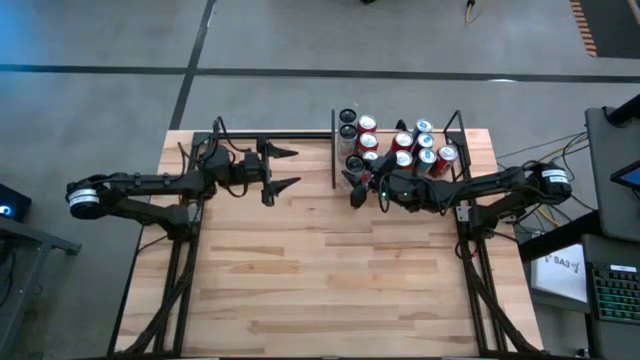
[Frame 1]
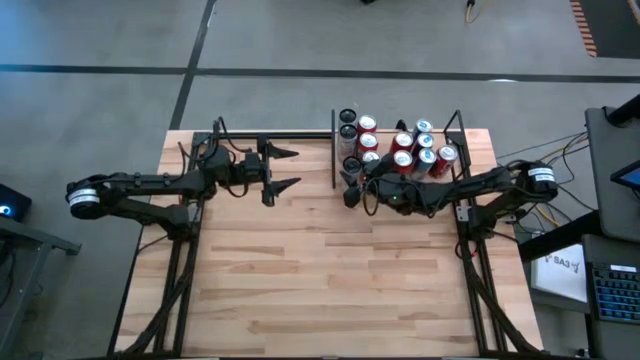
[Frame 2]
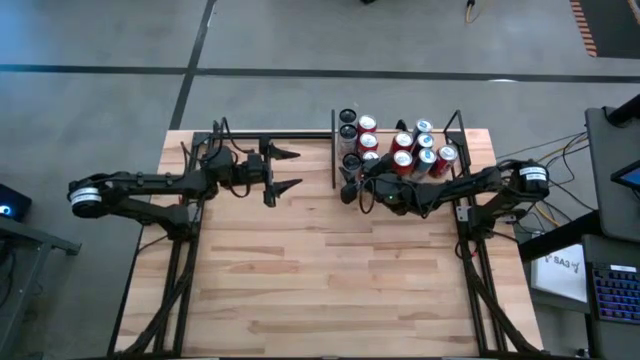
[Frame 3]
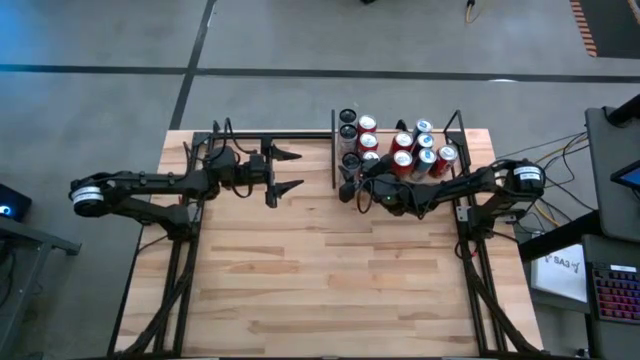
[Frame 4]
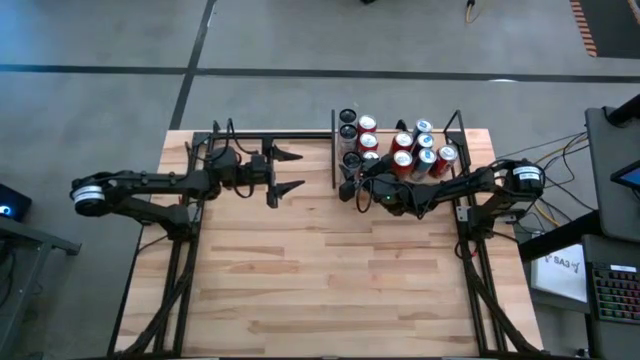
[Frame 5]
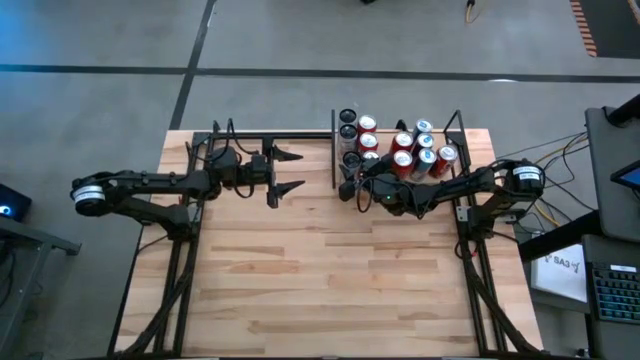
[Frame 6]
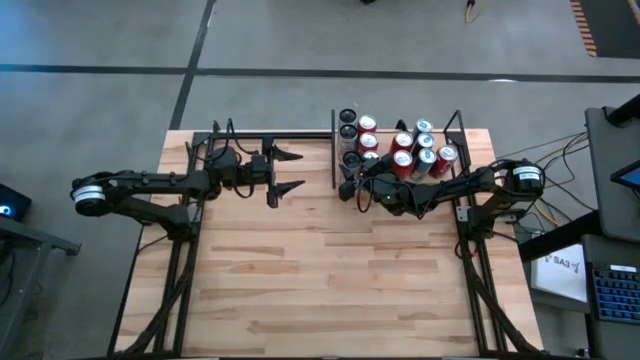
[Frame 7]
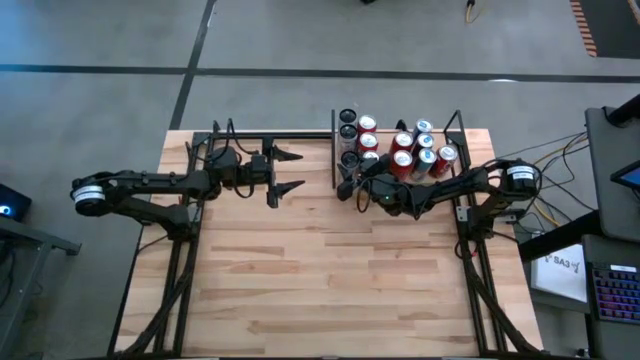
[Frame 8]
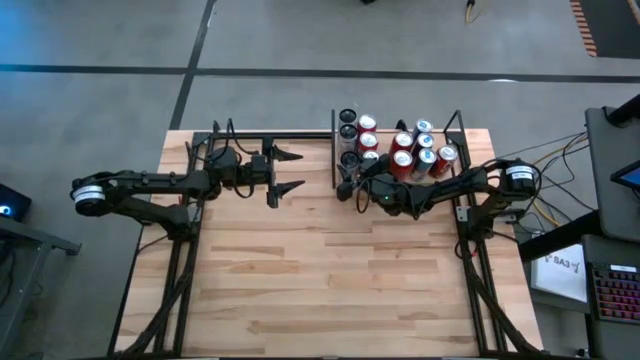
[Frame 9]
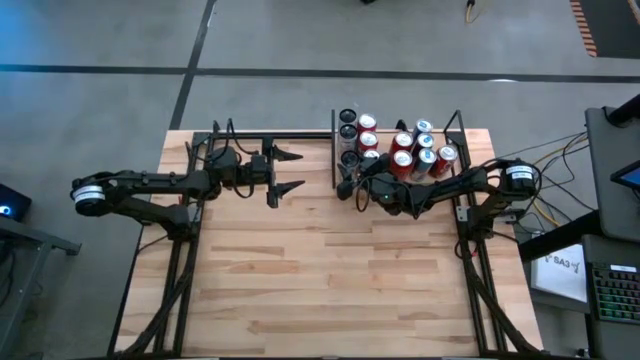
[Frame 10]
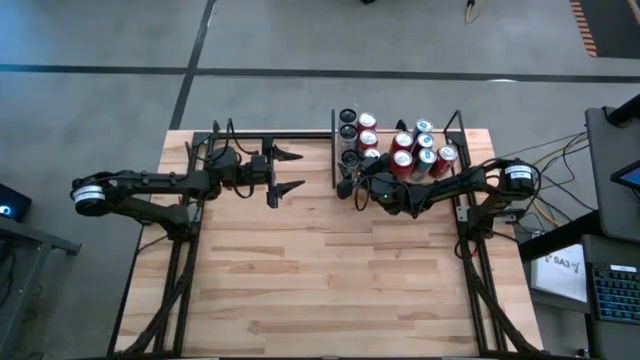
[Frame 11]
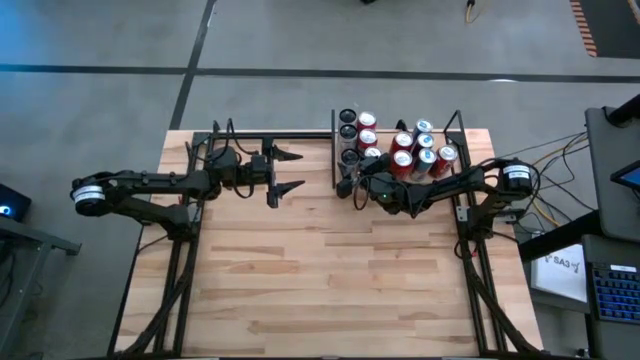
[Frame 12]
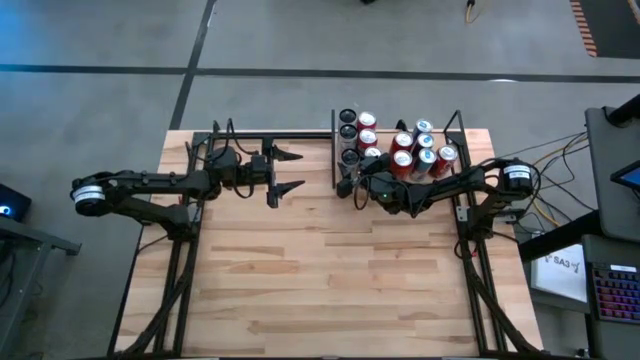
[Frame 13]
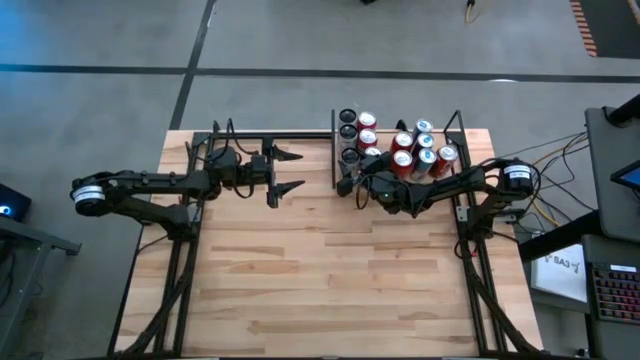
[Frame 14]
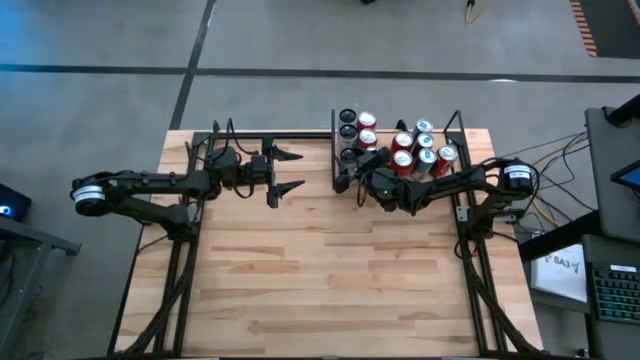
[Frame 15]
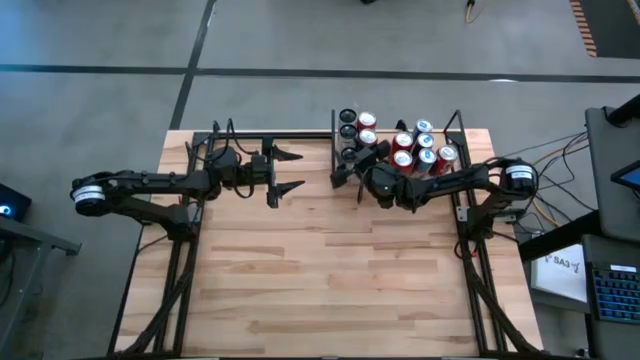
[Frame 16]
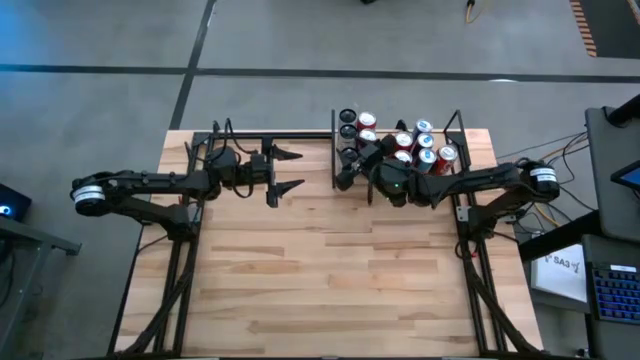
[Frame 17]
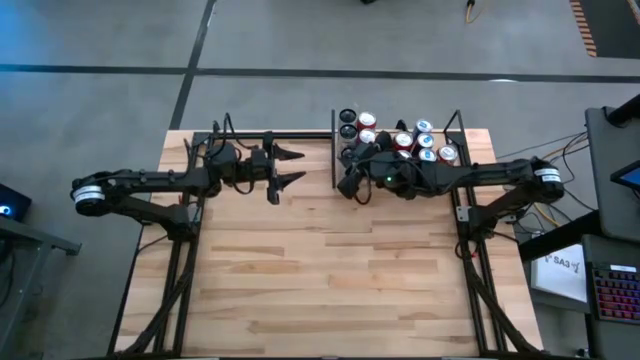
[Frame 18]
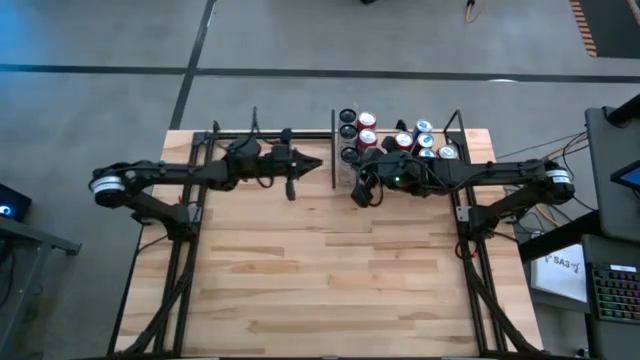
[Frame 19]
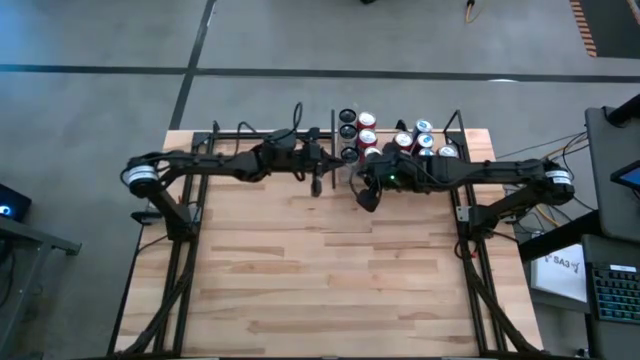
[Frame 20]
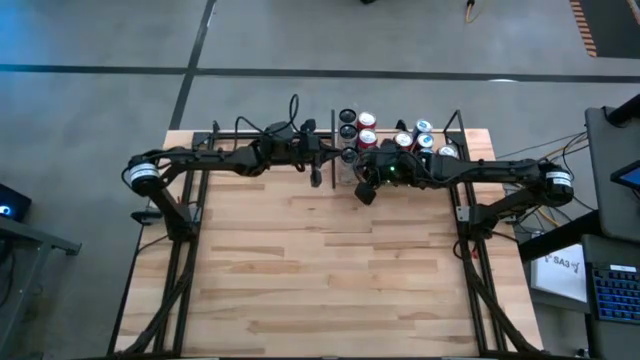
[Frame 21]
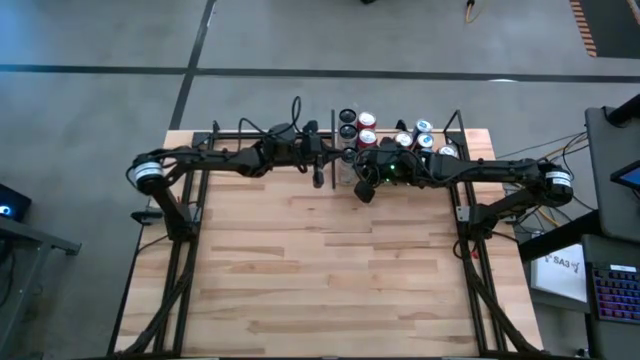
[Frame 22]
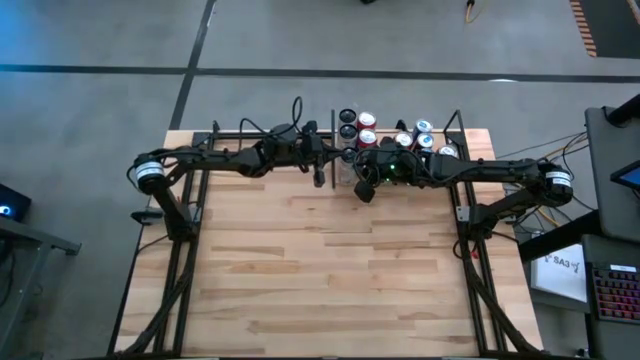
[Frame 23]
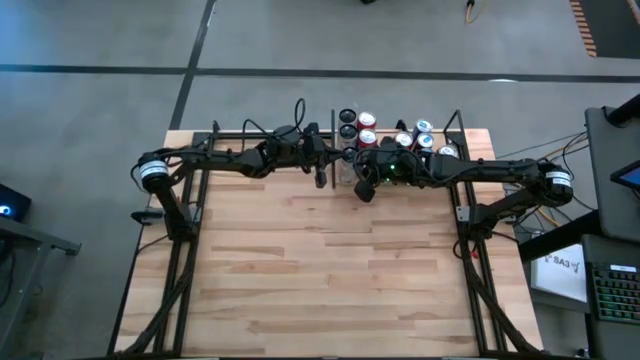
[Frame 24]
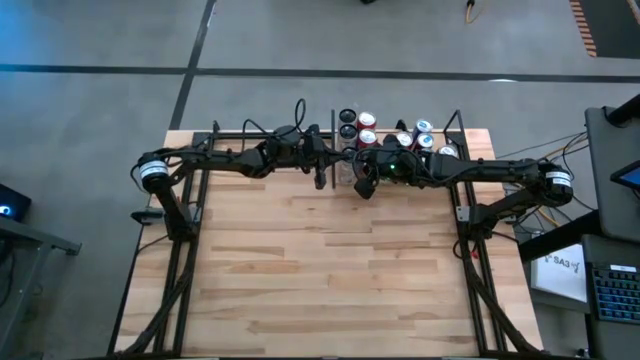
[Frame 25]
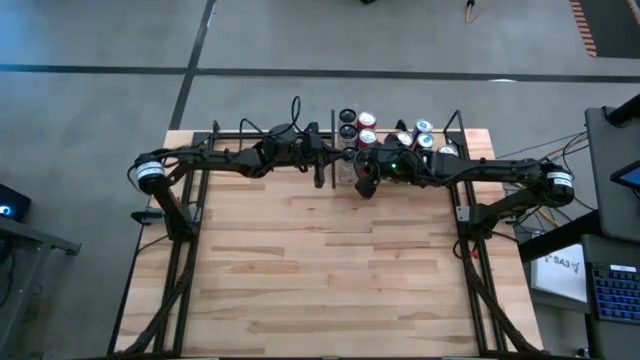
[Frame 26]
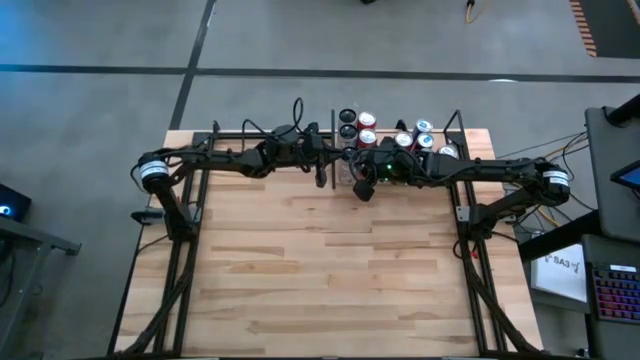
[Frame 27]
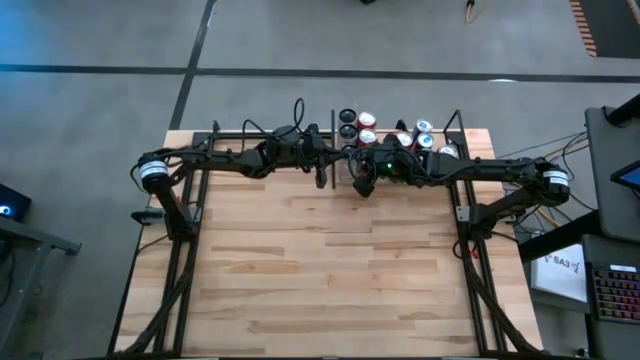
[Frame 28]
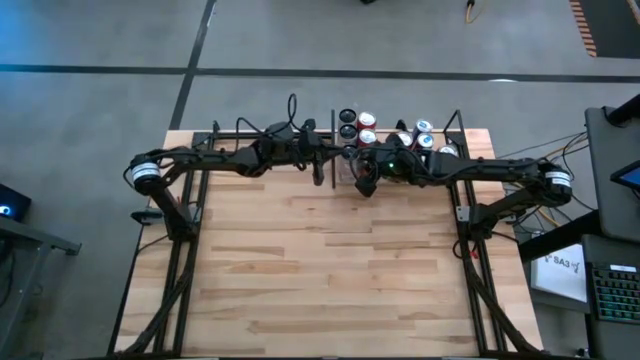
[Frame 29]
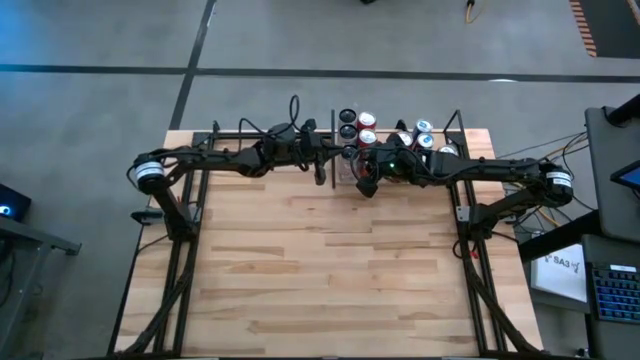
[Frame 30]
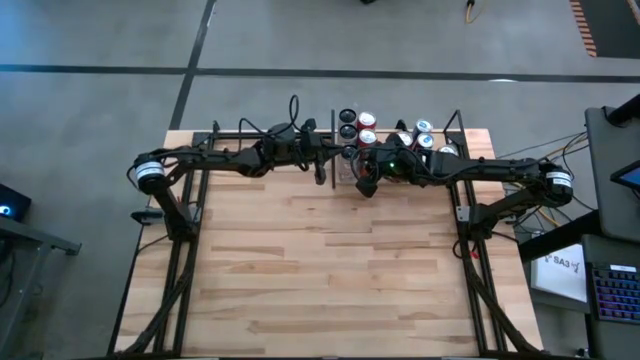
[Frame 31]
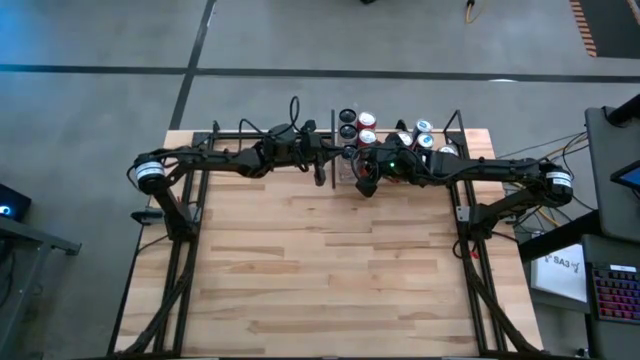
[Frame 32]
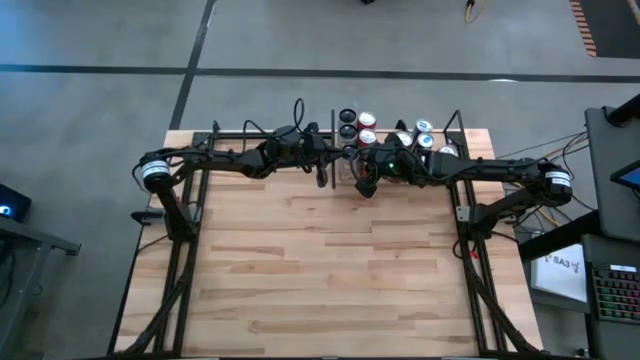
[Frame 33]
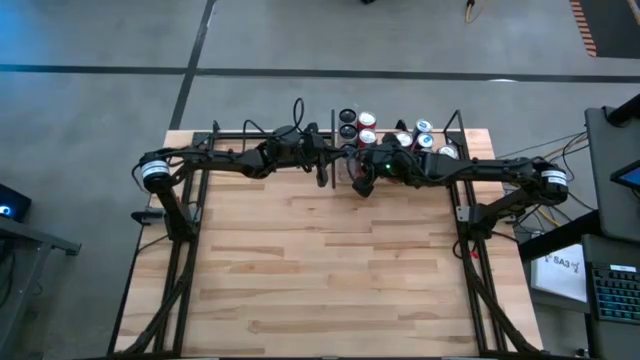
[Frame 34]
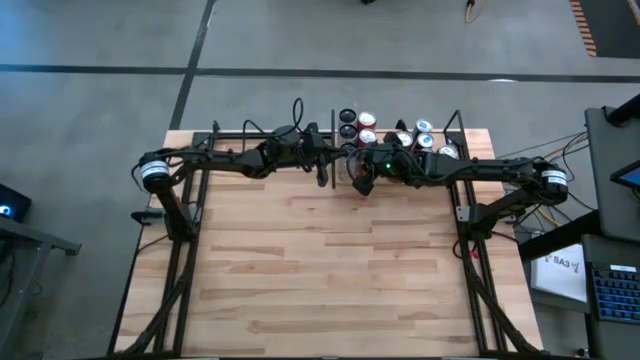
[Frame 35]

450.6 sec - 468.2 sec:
Task: Place canned beverage on shelf
Put the white soda can on the shelf aligned with the other white soda cans

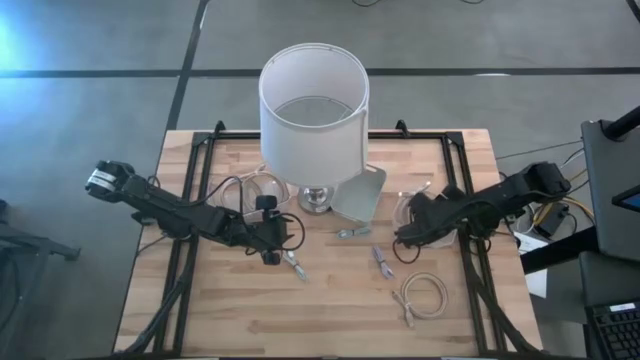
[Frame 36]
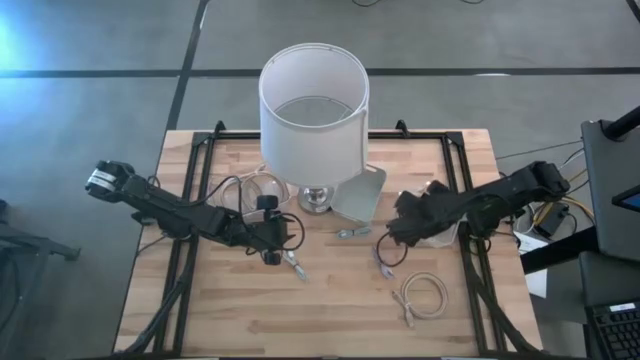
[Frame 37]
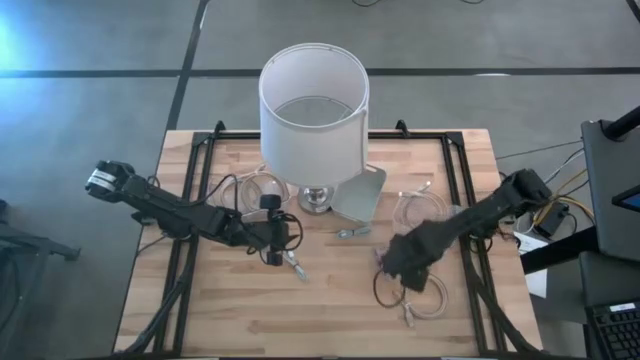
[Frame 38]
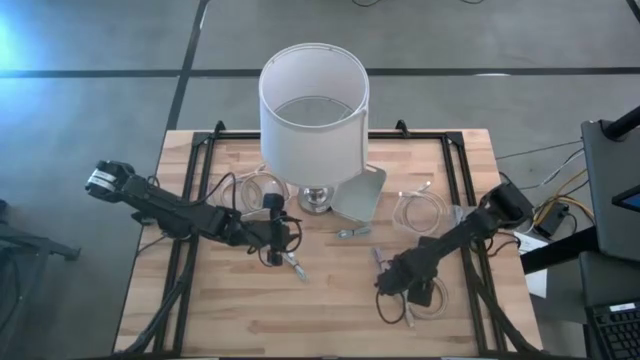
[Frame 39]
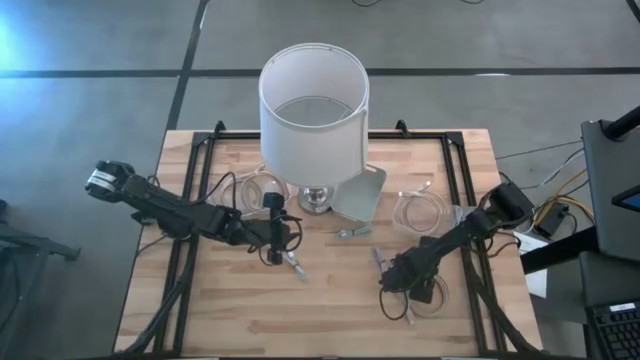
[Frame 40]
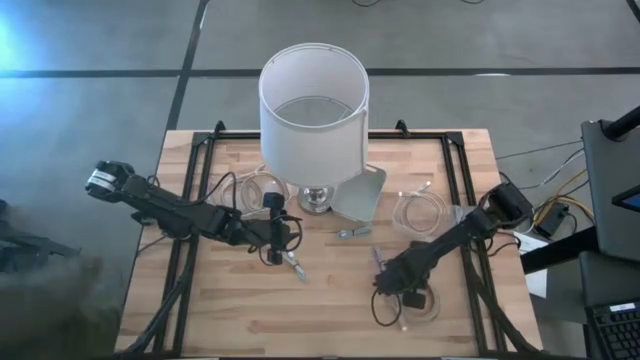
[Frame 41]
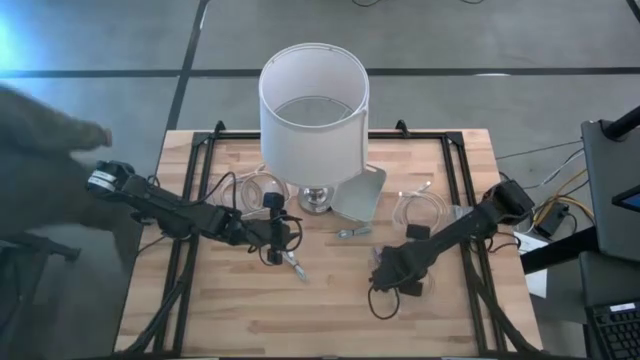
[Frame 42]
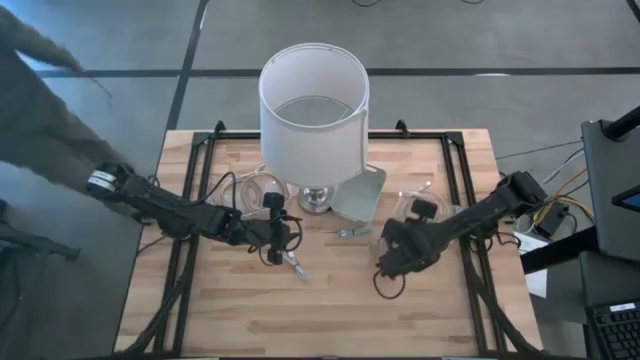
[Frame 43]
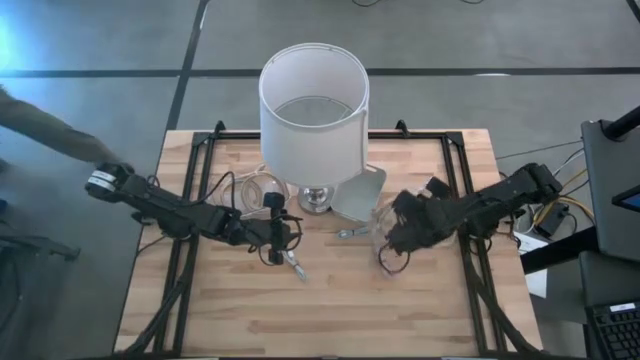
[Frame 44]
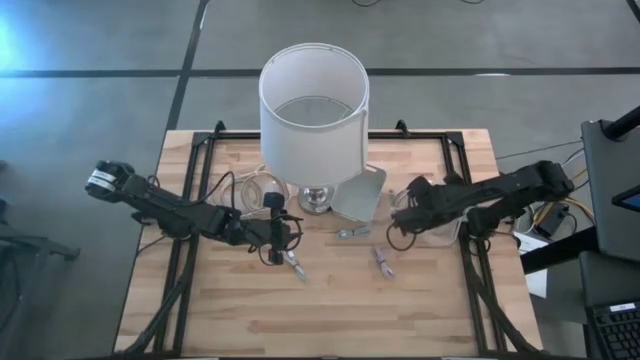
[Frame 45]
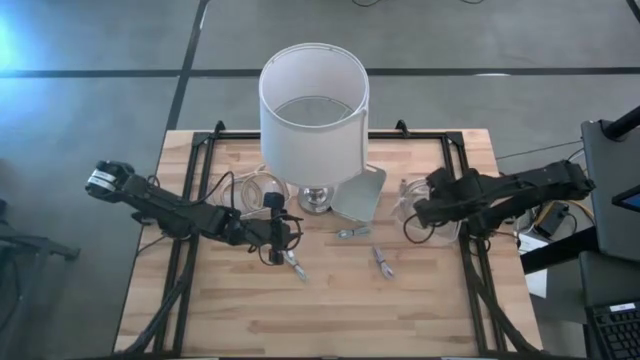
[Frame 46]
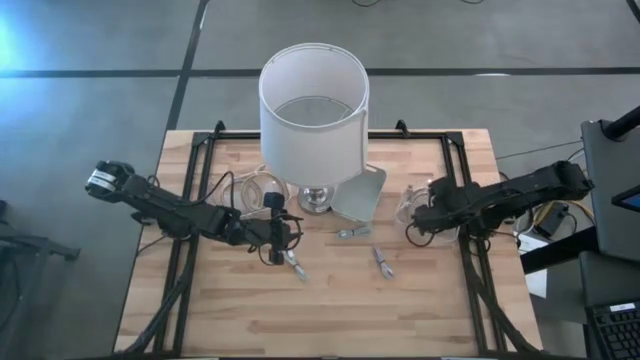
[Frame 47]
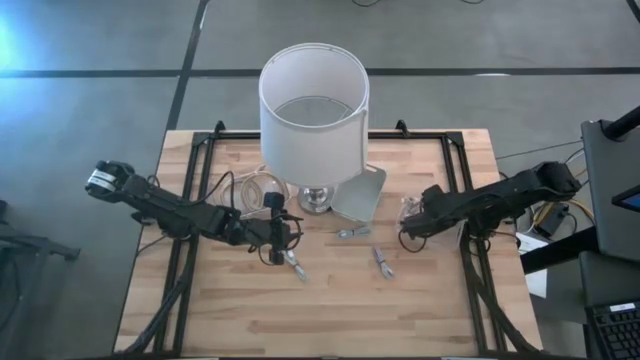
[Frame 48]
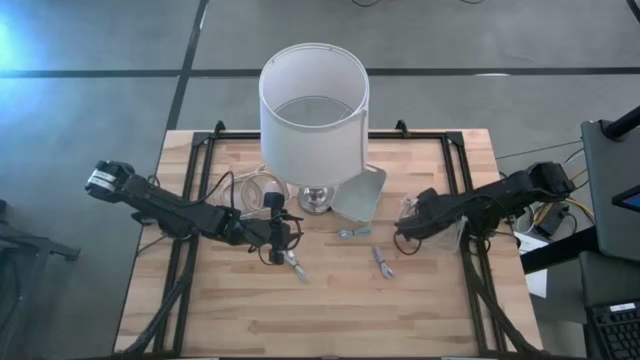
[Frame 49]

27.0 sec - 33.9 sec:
Task: Pick & Place USB Port
Put the light brown HDMI cable into the right transparent bin
